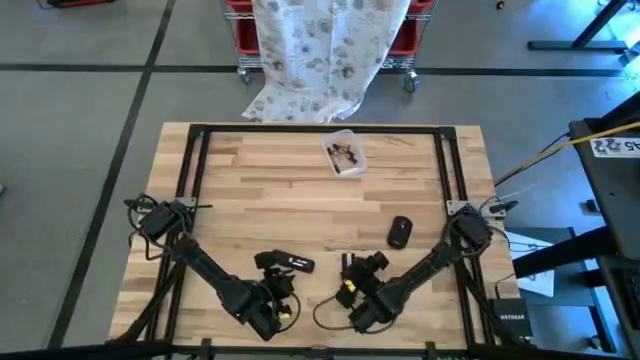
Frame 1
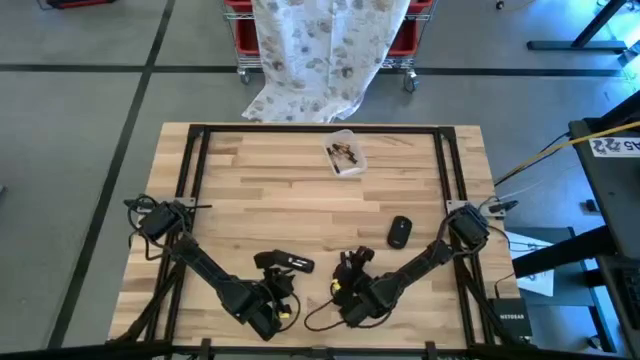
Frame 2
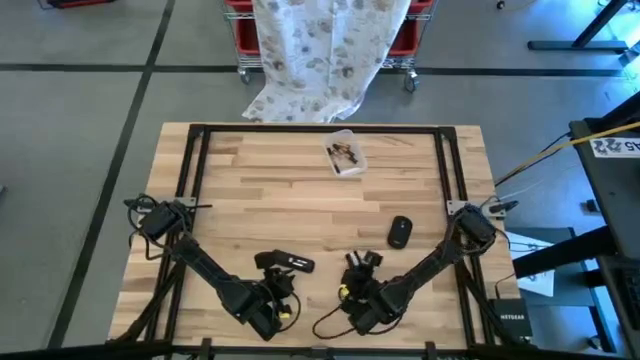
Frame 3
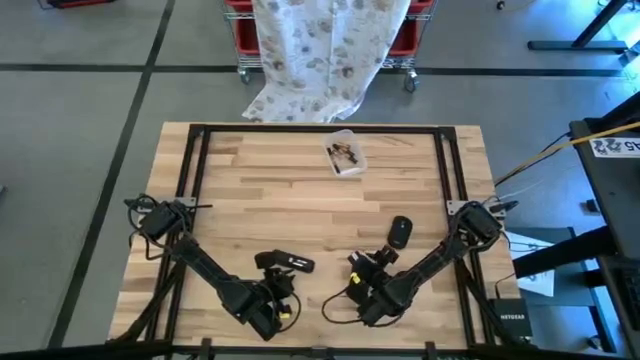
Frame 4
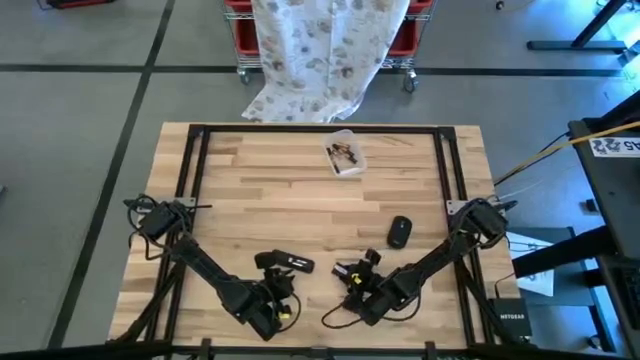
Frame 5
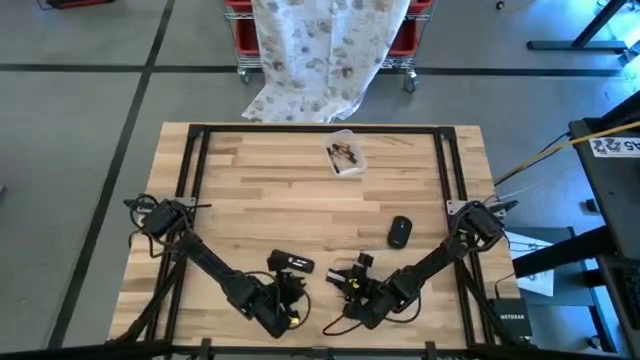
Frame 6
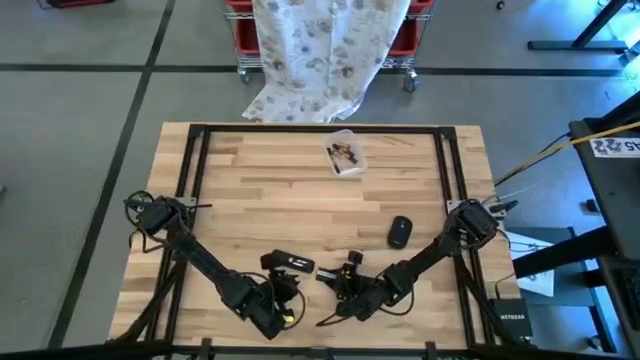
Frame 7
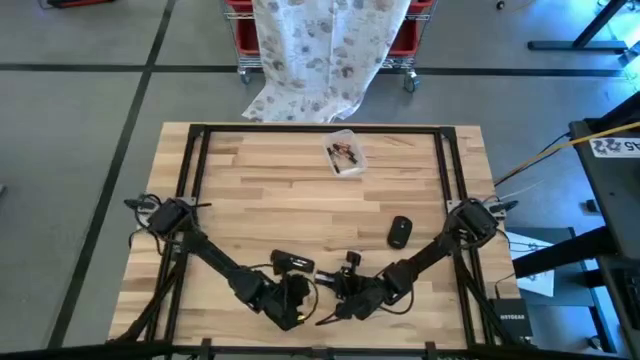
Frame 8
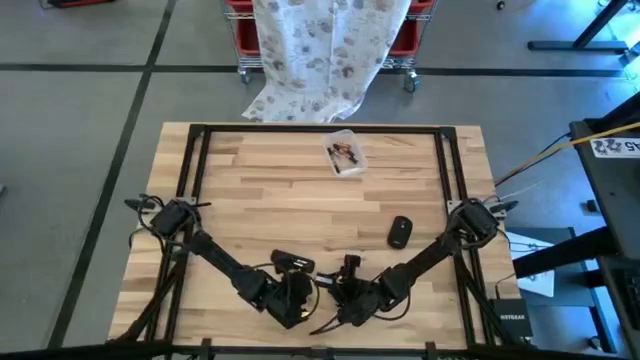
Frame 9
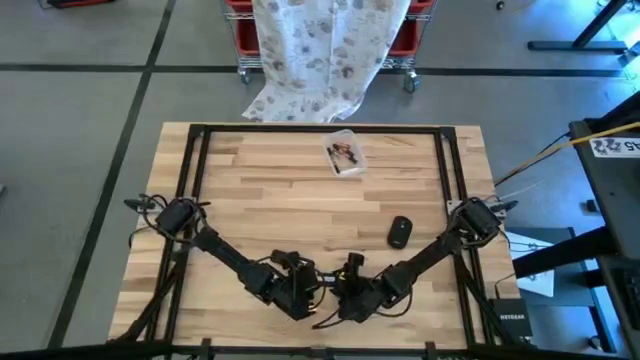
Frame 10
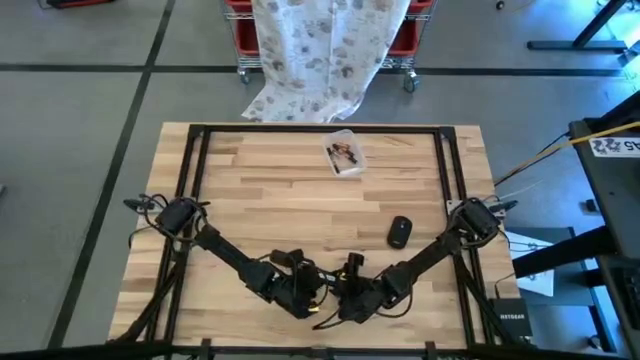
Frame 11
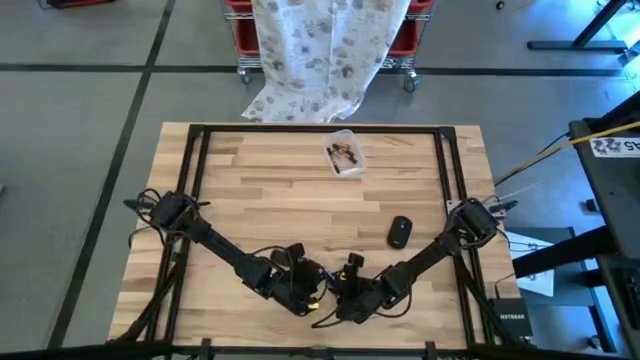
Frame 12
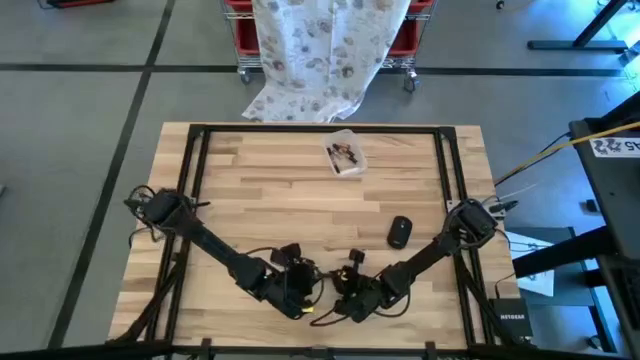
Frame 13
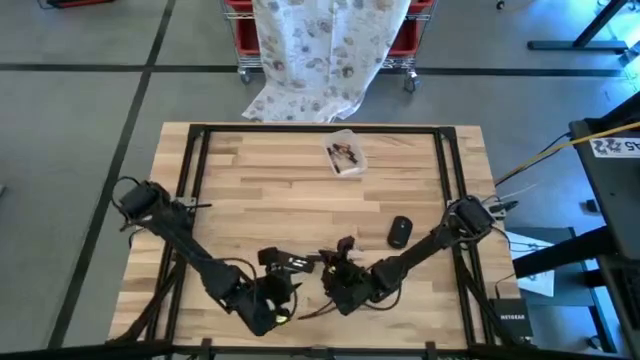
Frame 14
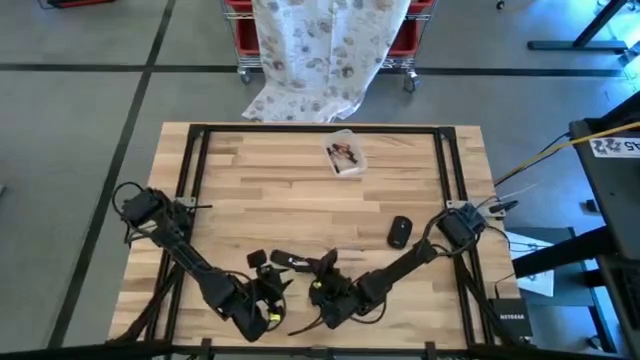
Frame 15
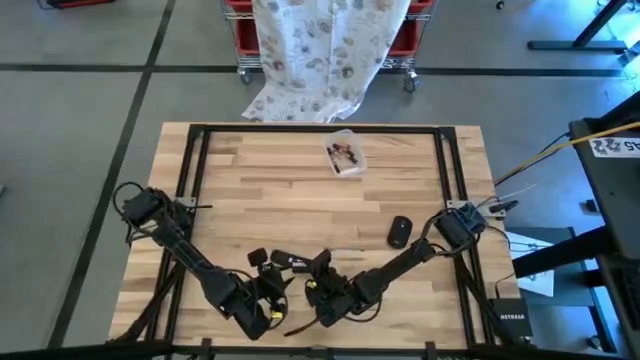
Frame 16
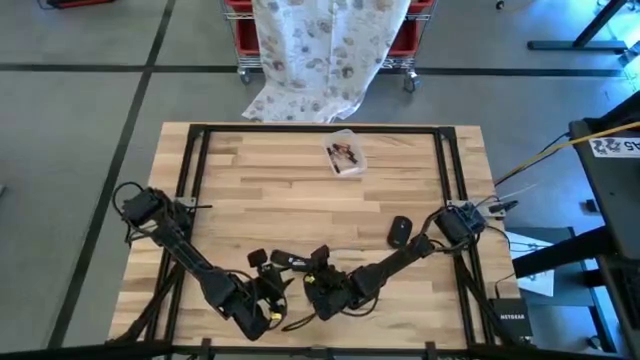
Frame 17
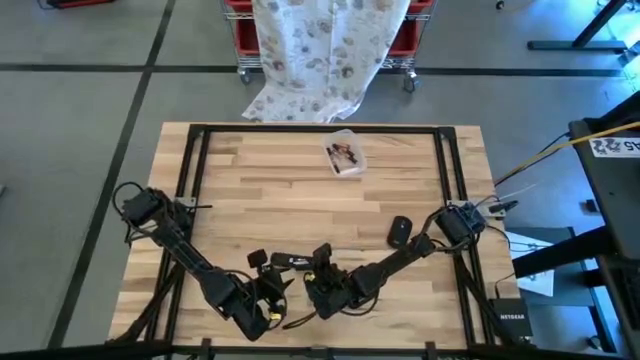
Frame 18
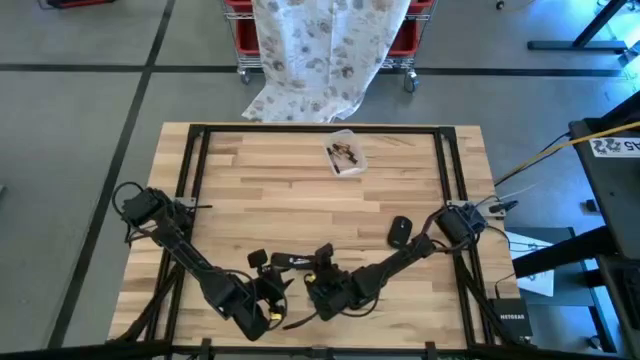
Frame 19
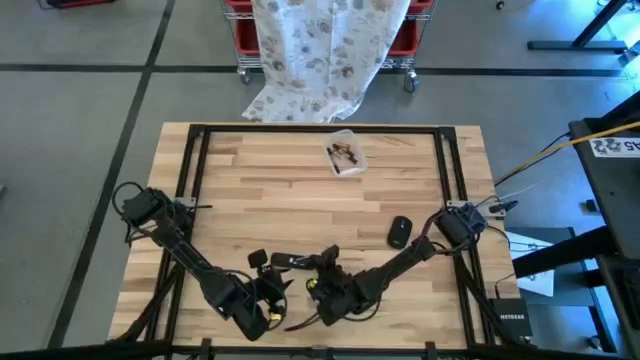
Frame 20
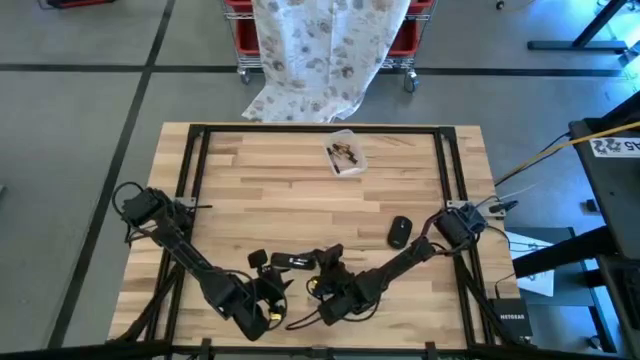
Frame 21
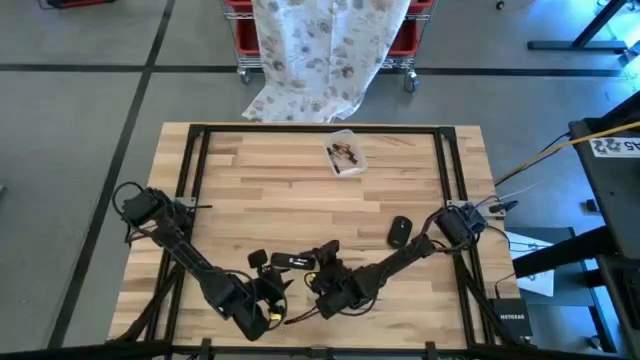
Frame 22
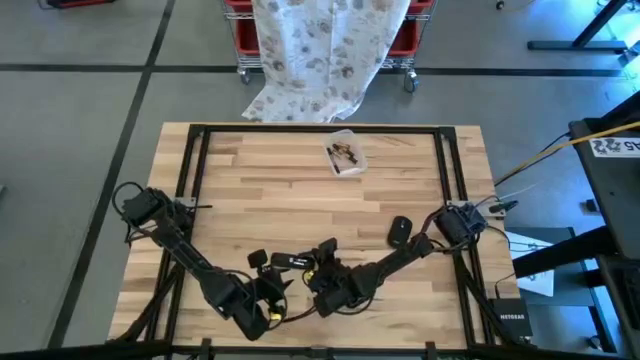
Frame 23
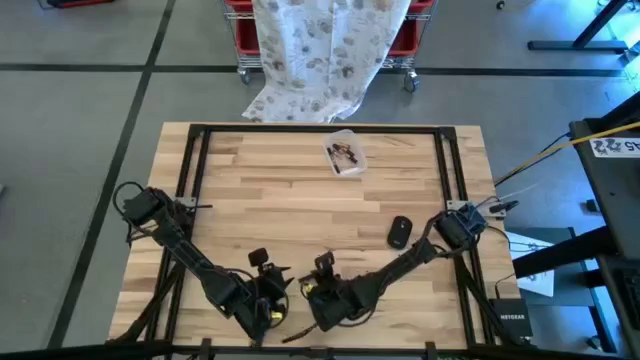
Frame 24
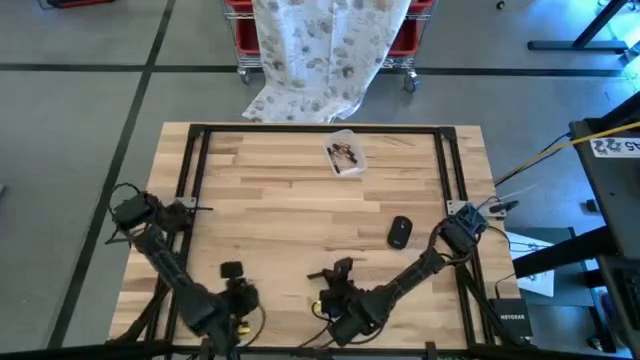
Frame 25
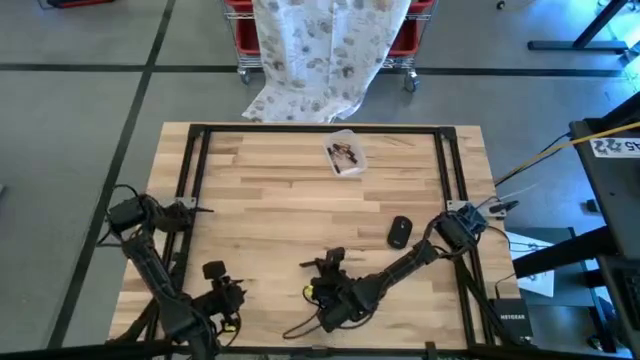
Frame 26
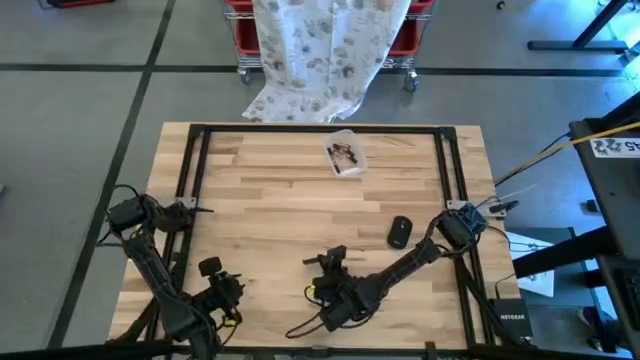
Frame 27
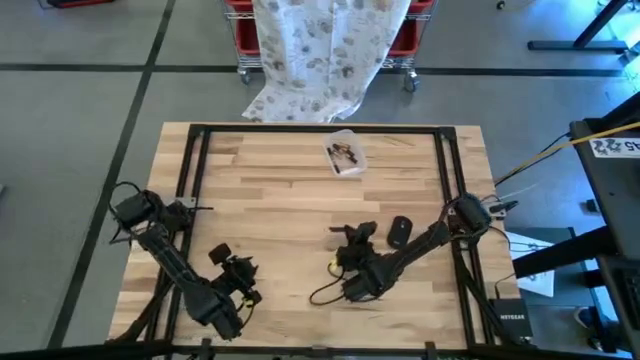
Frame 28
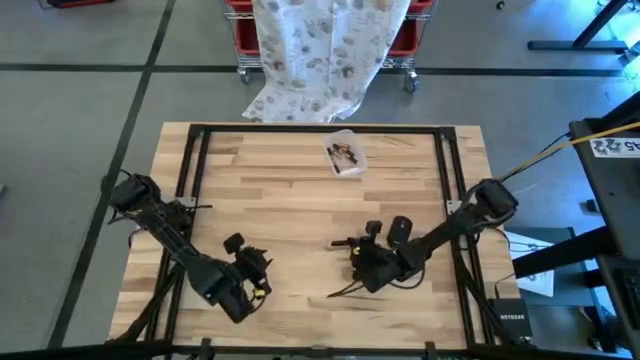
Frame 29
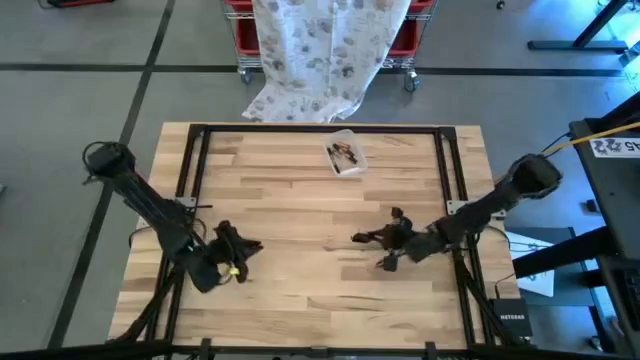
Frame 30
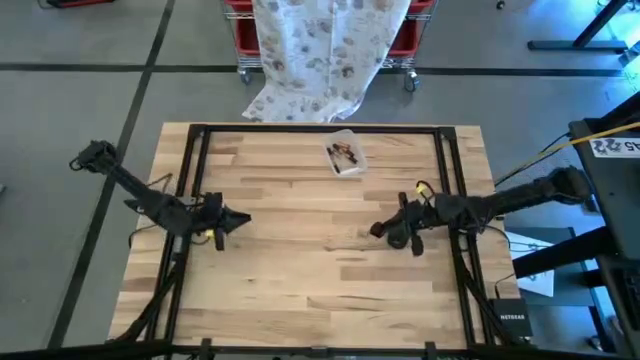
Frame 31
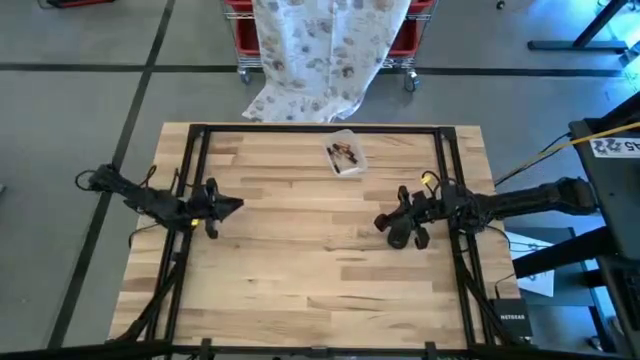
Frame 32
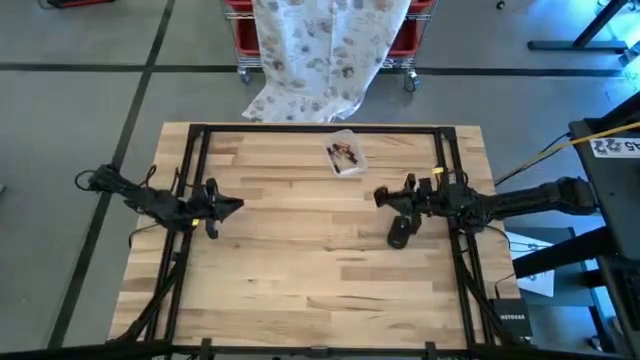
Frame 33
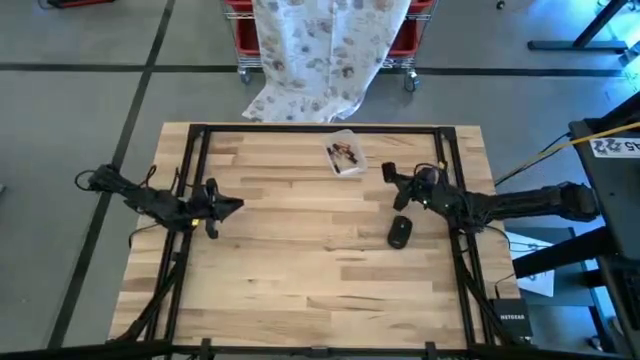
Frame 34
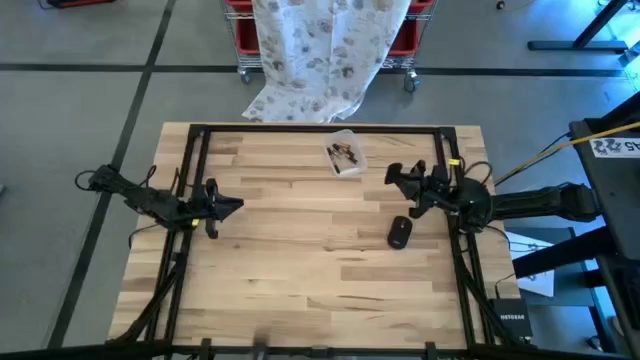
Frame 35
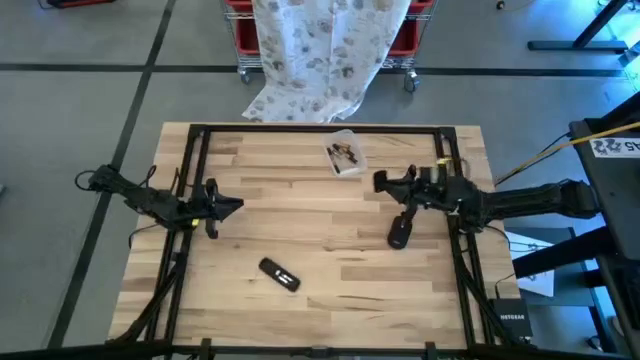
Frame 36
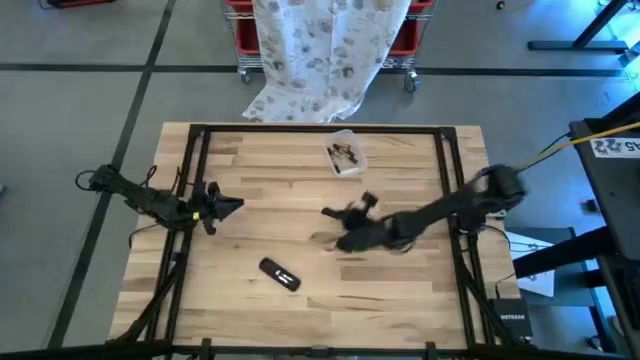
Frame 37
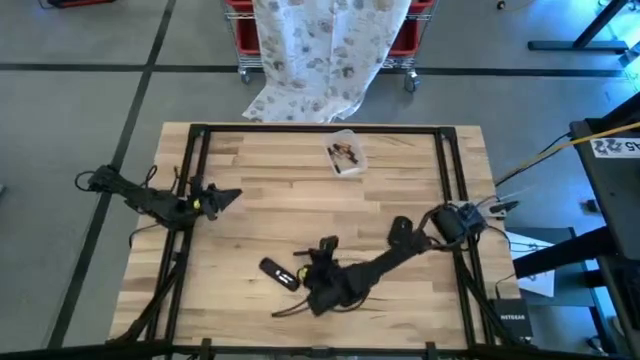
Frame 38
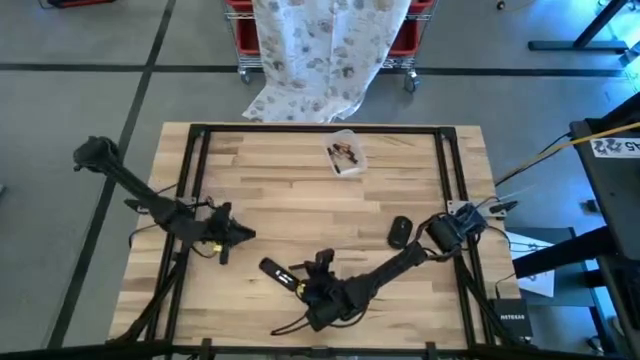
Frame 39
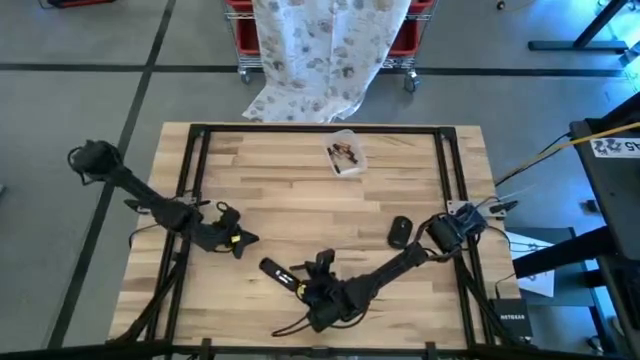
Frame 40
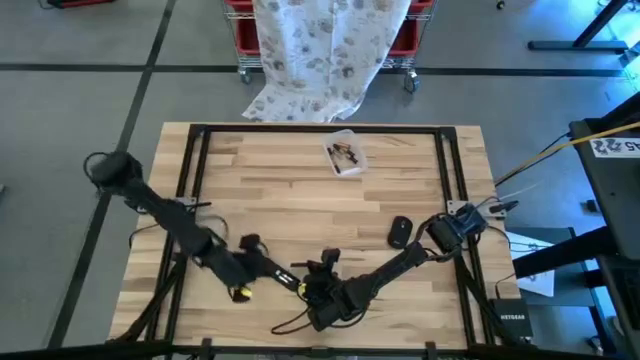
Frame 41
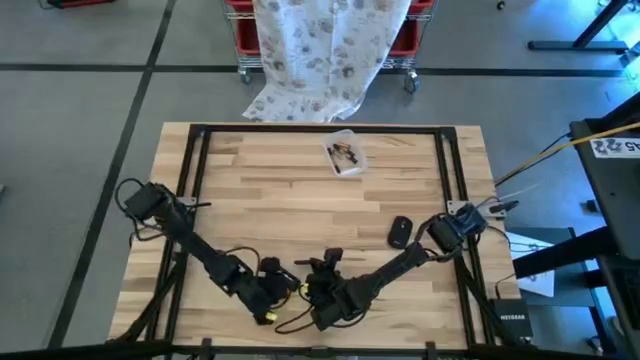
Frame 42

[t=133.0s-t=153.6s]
Task: Insert battery
Close the remote control cover
